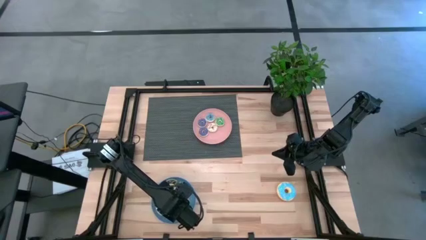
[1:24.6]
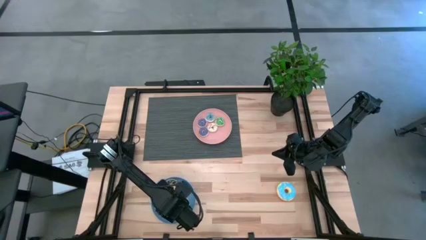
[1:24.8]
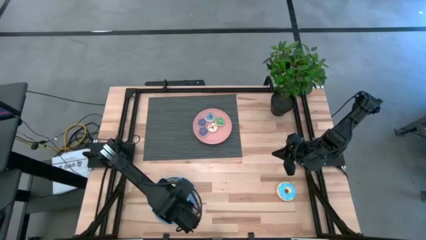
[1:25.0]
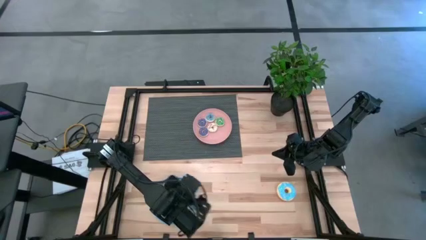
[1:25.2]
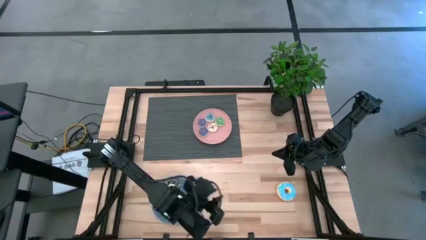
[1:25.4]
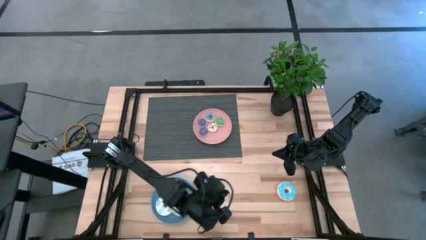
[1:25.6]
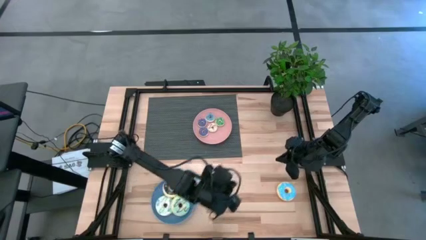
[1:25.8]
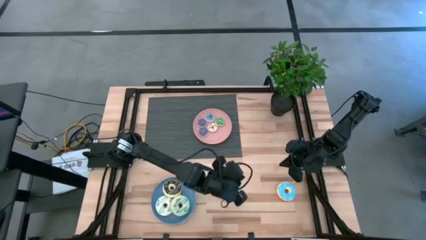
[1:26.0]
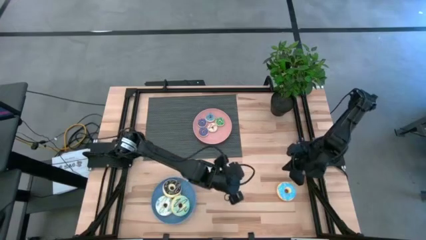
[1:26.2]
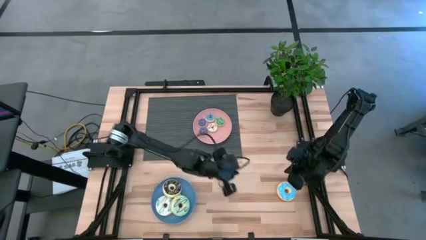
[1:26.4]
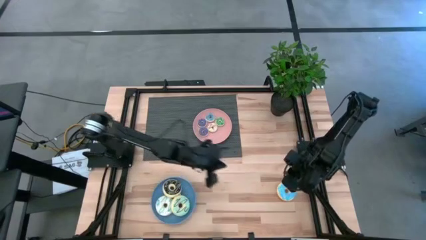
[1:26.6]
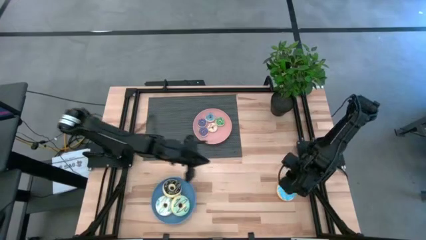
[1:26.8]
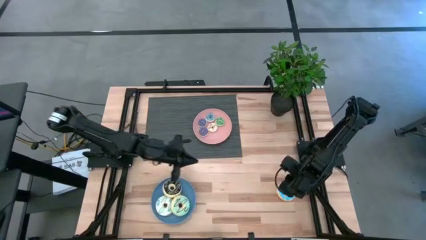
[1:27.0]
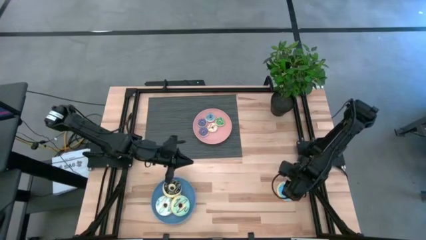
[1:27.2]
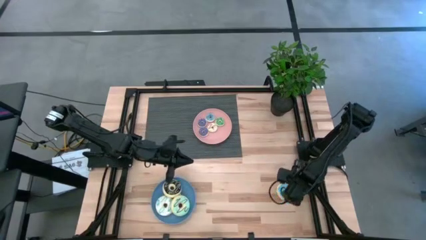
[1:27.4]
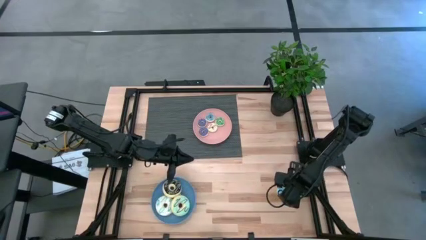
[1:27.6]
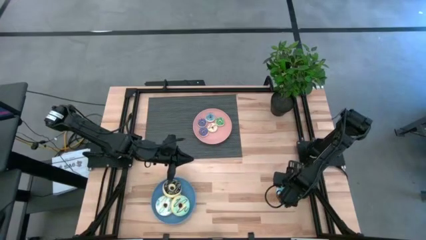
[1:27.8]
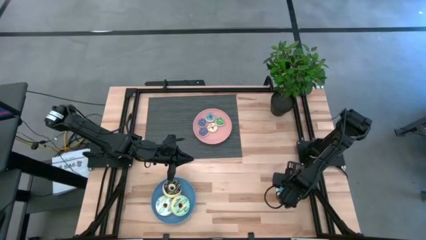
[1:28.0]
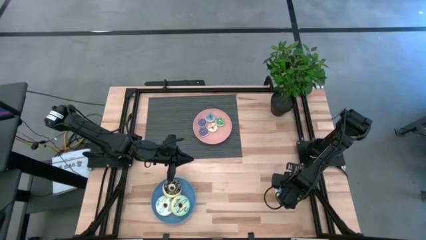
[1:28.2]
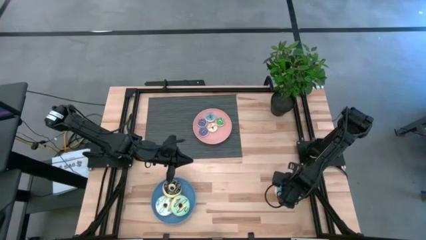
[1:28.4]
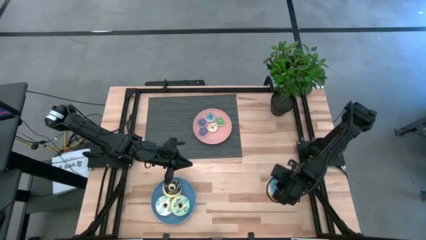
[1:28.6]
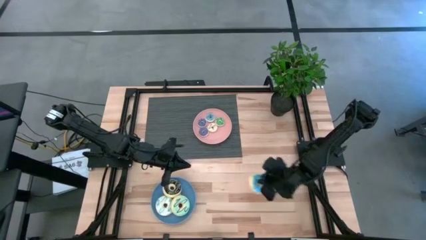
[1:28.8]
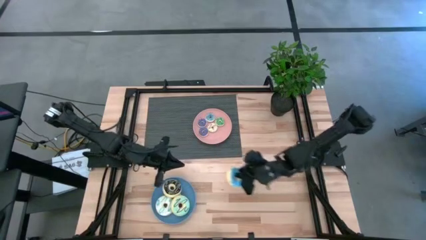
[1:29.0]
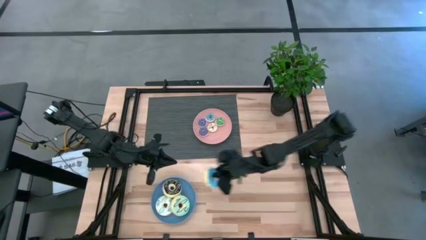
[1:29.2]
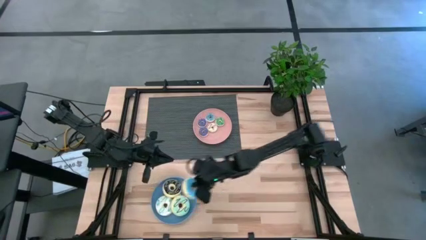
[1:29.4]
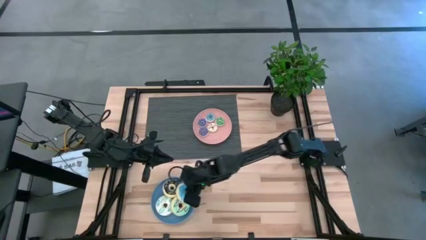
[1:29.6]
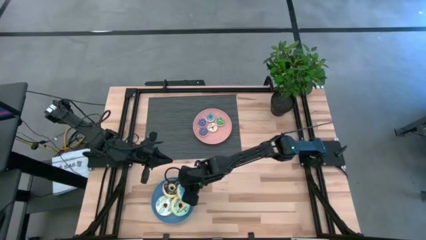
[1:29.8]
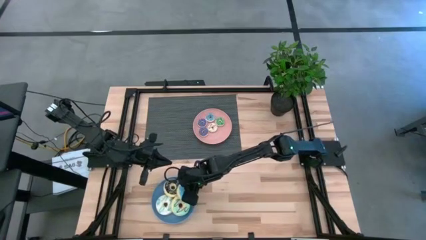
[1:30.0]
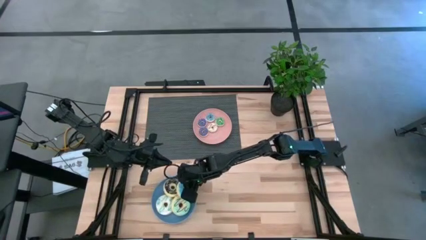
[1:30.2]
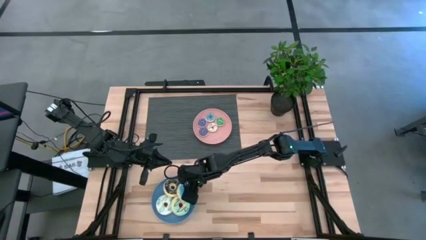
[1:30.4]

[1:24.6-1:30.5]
Task: Pick & Place donuts
Put the big light blue donut on the blue plate

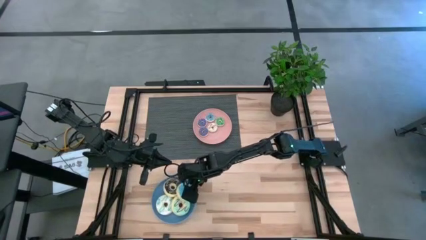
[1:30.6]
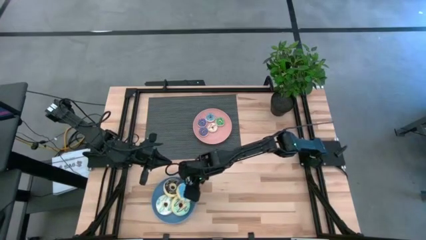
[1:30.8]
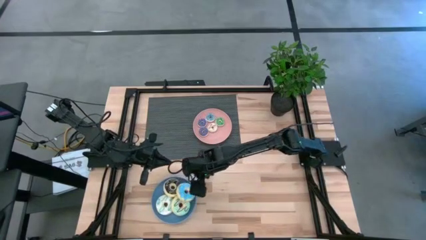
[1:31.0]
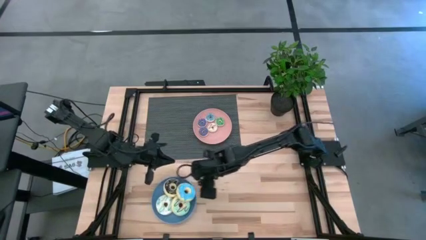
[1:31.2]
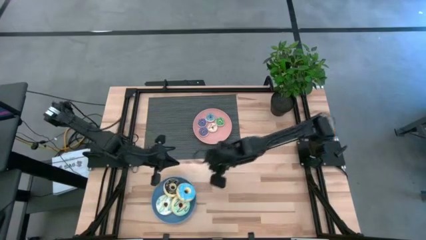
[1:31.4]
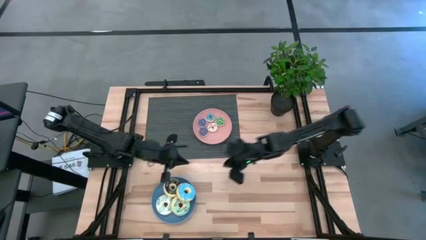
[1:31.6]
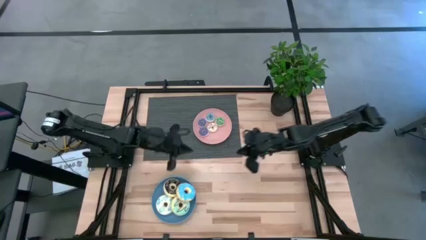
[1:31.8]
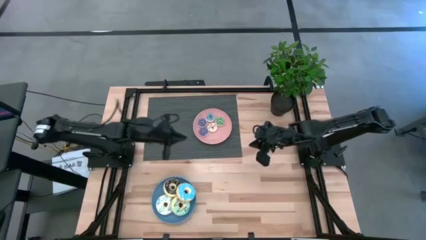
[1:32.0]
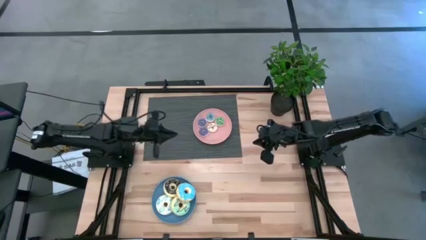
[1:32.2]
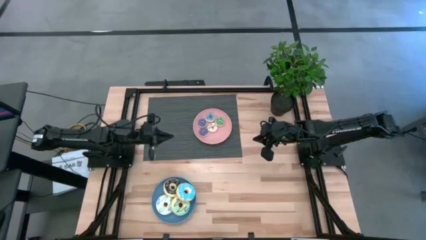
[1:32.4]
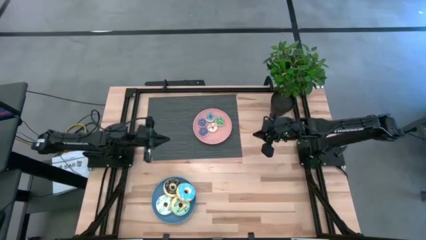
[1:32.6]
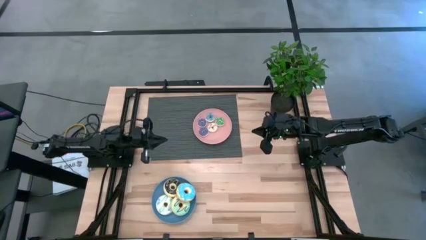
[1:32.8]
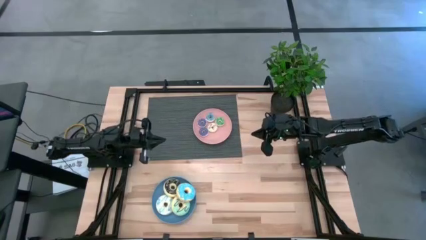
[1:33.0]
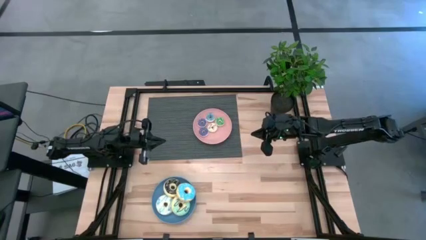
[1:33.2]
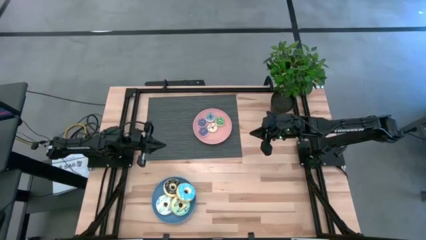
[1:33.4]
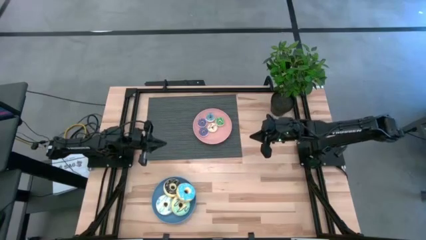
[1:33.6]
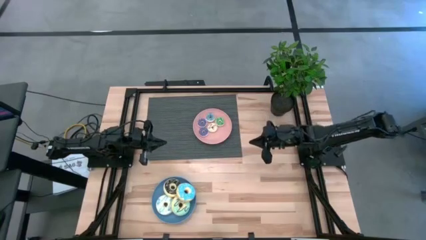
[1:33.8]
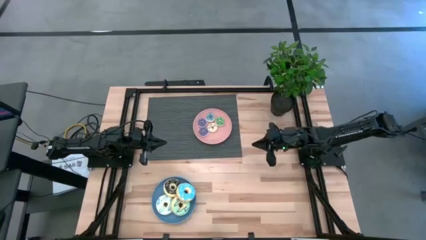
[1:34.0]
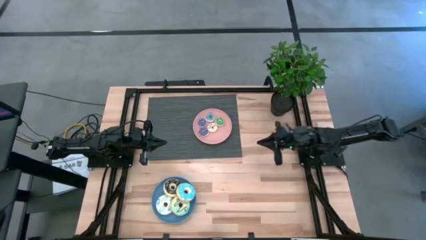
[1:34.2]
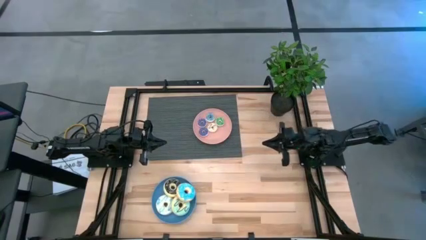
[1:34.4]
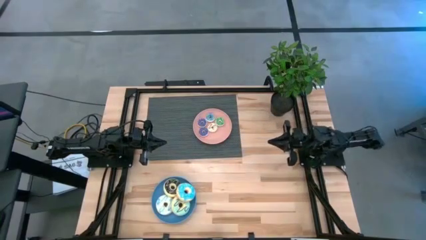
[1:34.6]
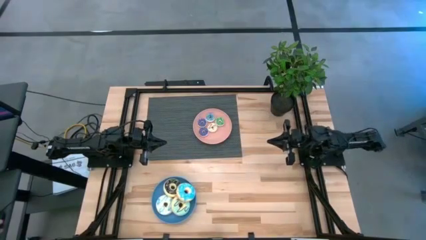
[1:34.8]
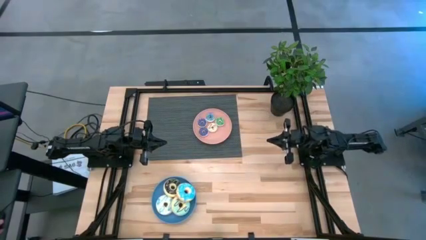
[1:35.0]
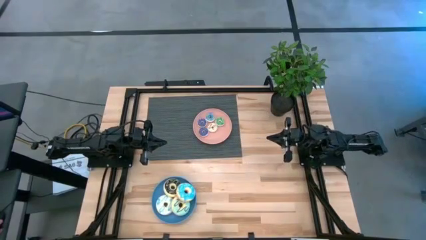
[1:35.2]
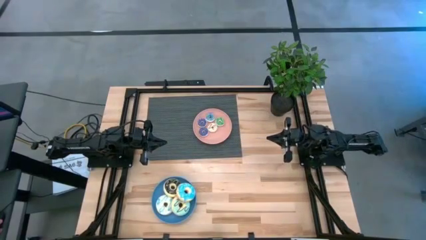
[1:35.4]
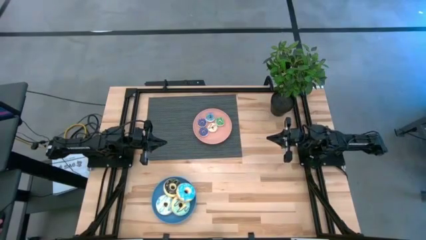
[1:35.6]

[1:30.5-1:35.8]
Return to Home Position
